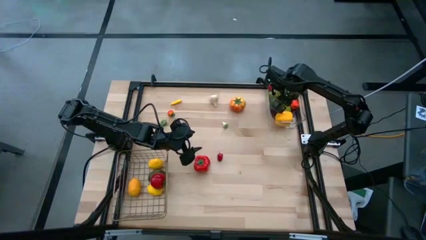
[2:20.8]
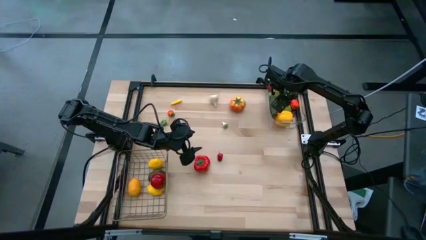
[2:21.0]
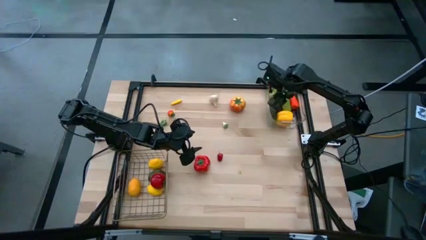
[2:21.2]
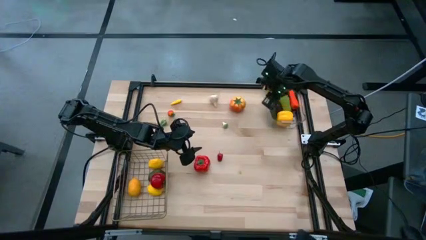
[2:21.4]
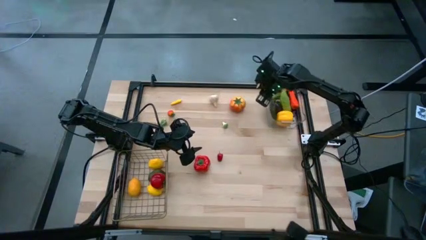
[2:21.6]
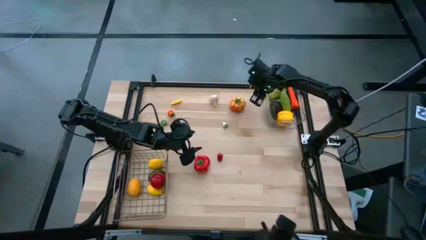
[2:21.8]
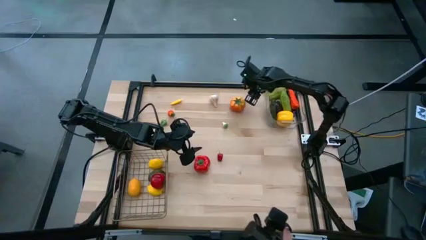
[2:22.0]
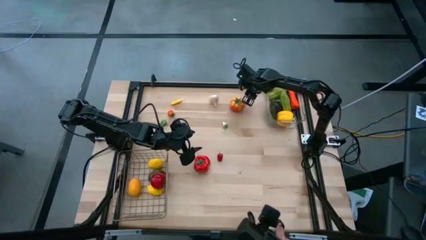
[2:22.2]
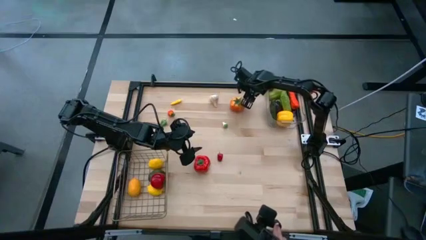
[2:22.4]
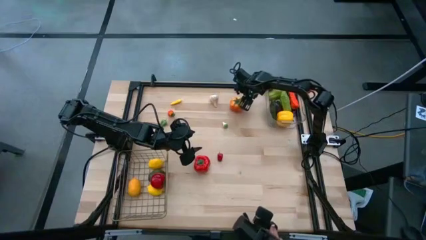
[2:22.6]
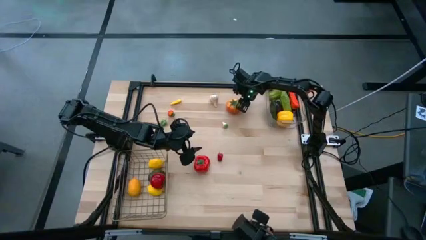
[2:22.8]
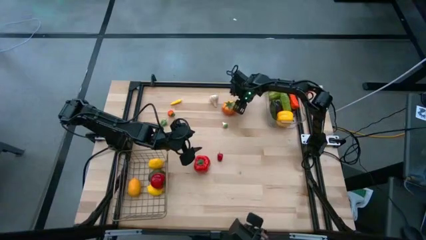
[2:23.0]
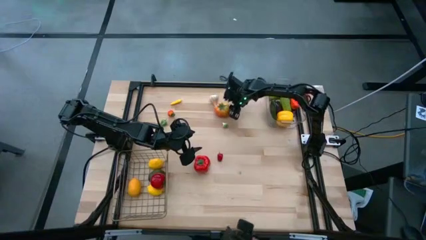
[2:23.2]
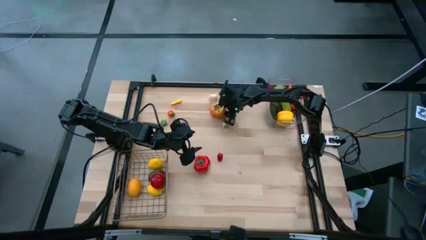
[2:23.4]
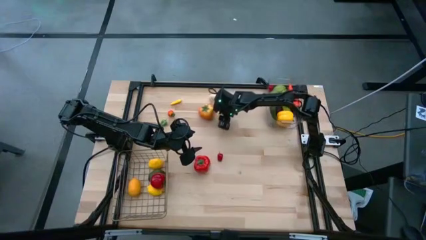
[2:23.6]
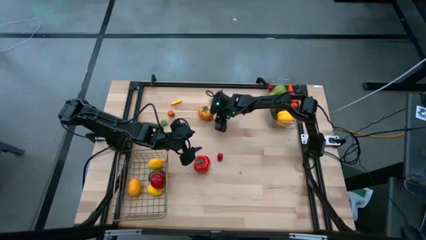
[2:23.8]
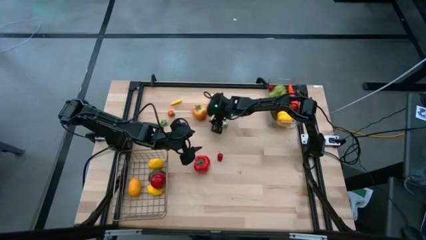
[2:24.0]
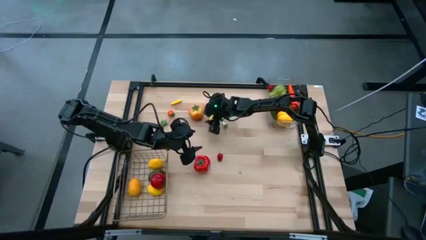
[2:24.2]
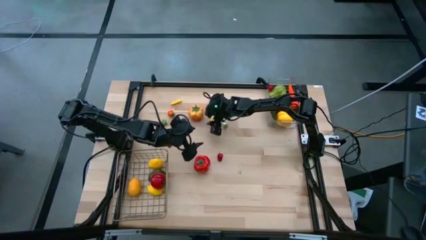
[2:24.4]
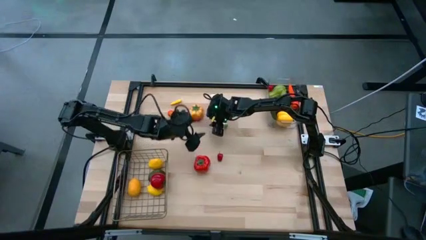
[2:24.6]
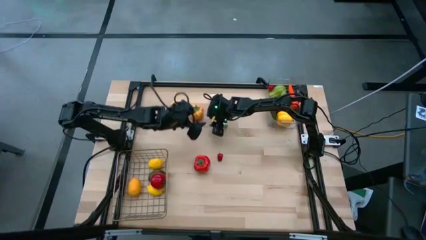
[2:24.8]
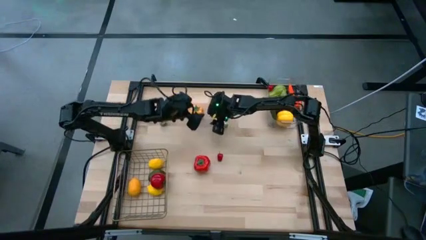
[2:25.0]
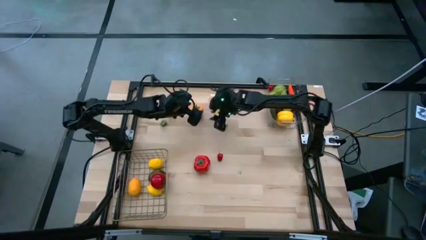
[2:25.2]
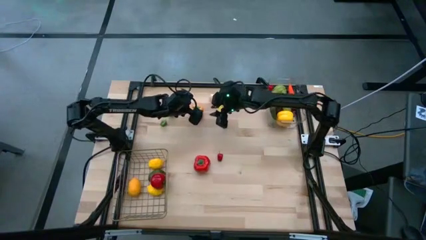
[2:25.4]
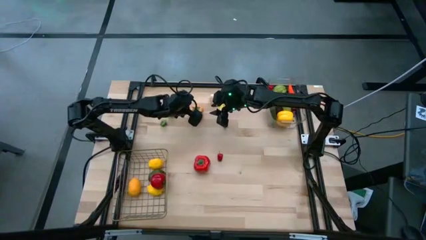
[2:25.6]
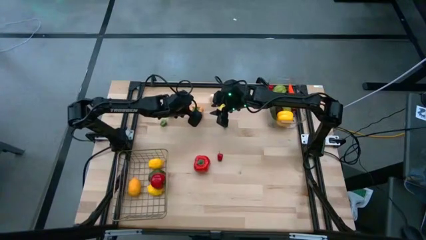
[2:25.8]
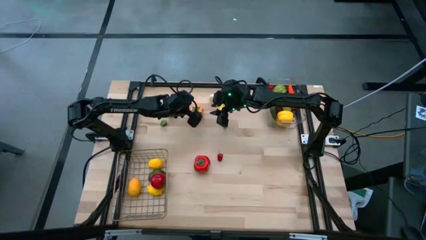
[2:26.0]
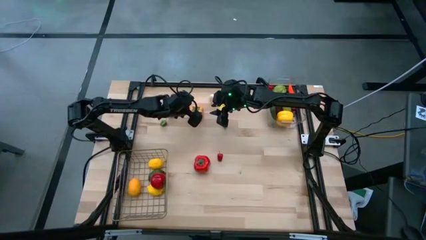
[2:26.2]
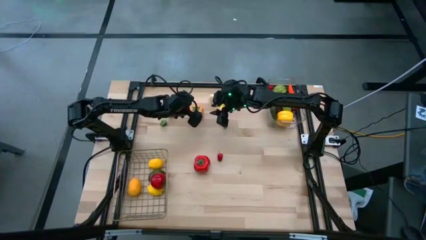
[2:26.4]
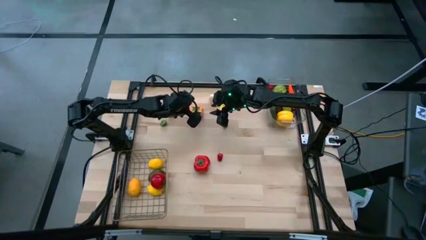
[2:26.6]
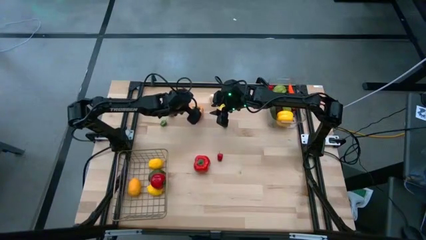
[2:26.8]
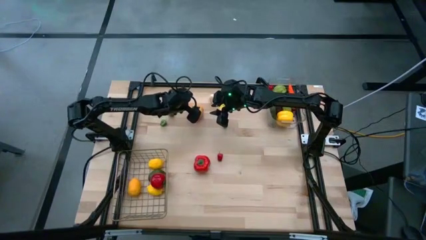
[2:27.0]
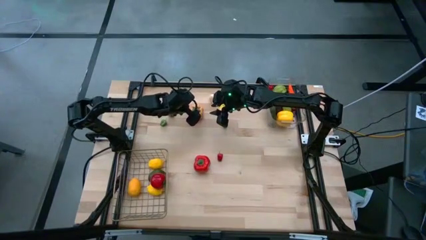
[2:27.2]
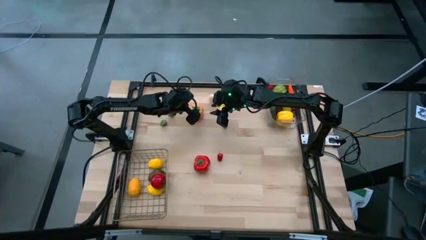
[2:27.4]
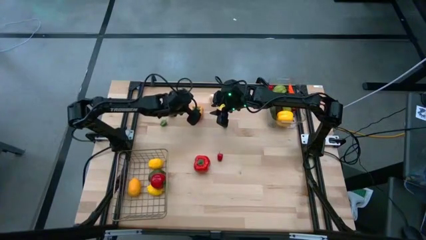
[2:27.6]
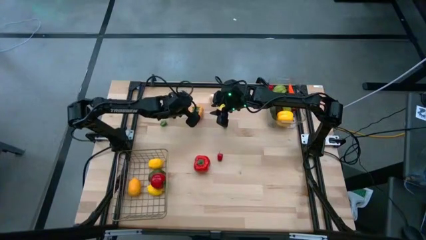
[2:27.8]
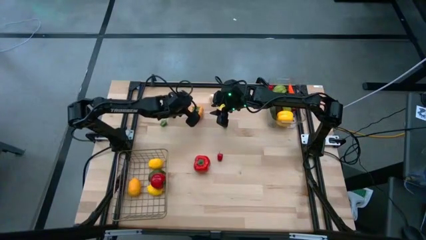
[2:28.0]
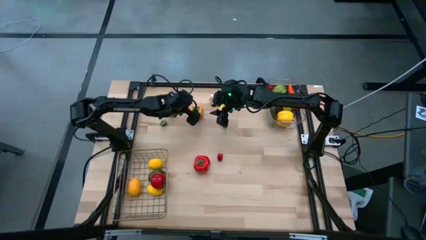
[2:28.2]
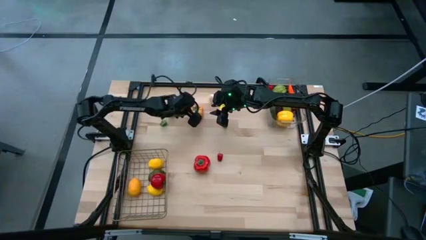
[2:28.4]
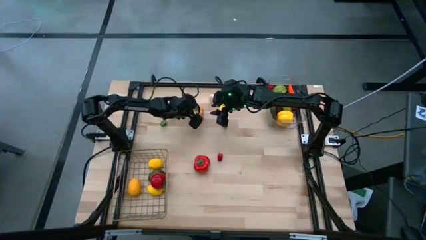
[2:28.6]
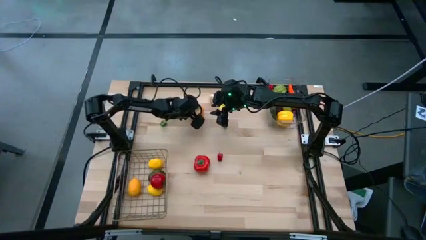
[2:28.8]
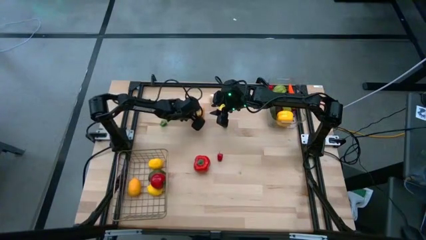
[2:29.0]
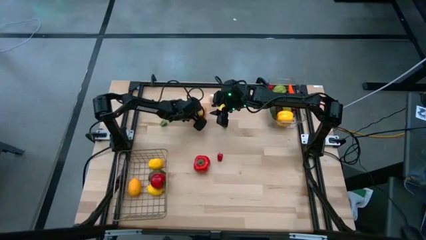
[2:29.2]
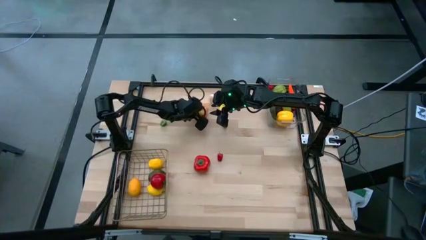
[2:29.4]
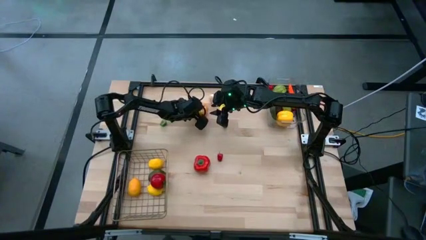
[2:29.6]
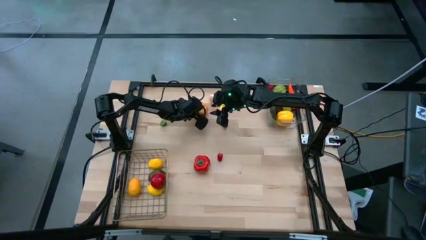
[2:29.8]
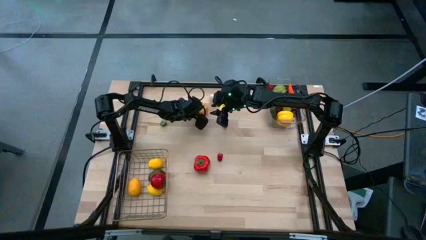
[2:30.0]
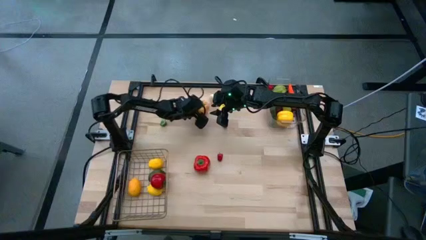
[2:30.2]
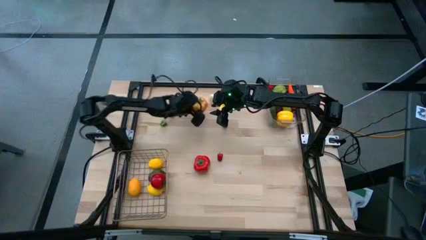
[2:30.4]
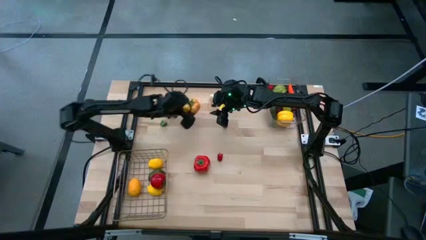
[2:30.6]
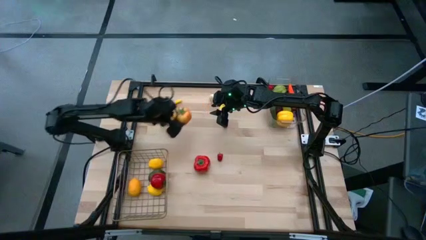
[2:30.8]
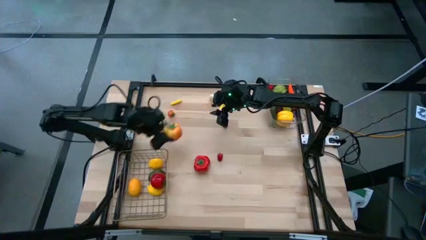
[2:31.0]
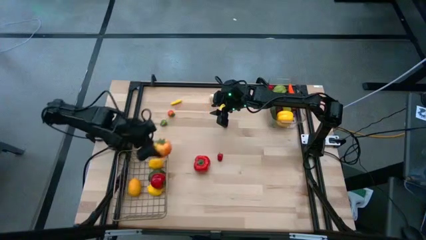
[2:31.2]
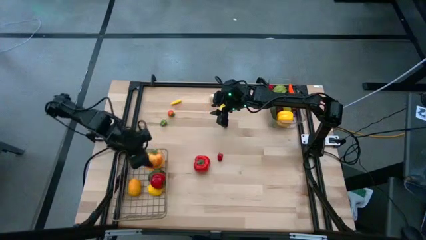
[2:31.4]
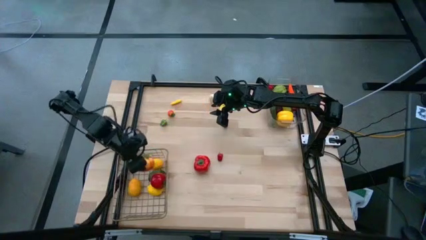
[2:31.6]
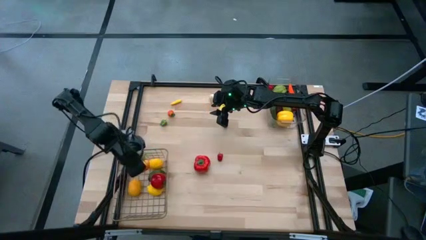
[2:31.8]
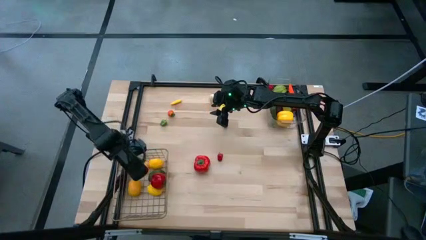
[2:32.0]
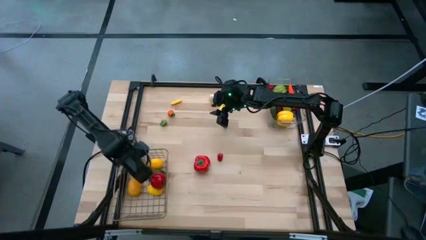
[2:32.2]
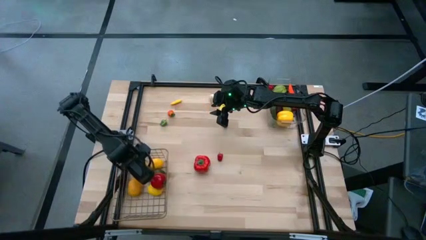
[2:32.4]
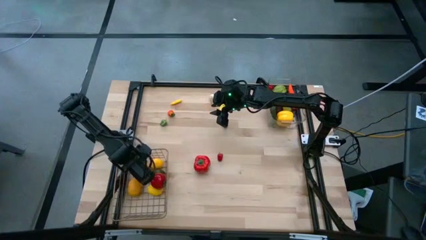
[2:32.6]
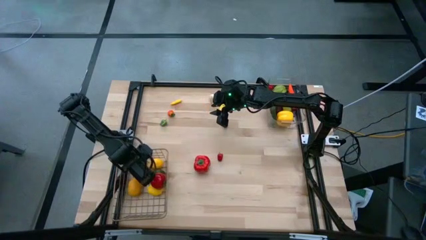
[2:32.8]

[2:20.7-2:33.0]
Task: Sort produce into baskets
Put the orange tomato into the wire basket
